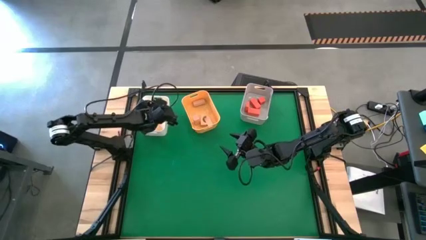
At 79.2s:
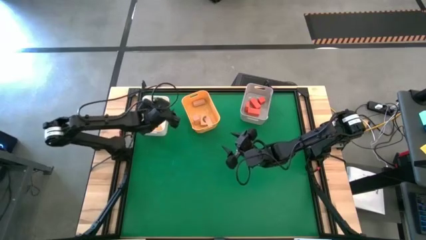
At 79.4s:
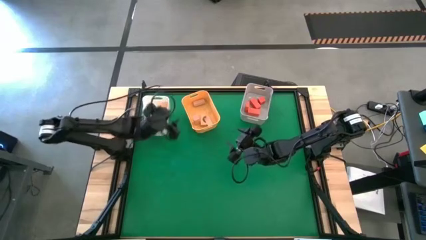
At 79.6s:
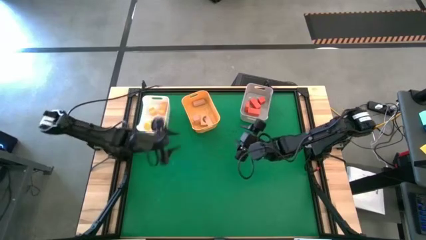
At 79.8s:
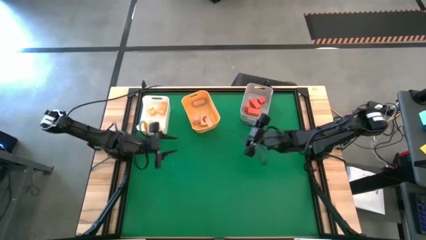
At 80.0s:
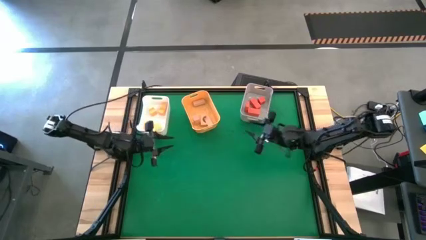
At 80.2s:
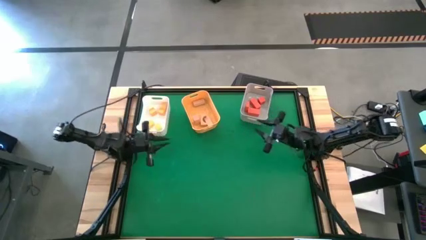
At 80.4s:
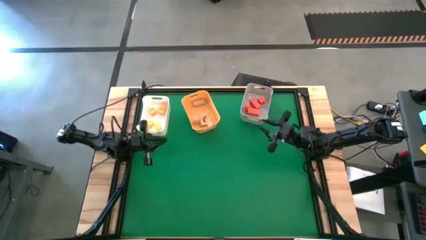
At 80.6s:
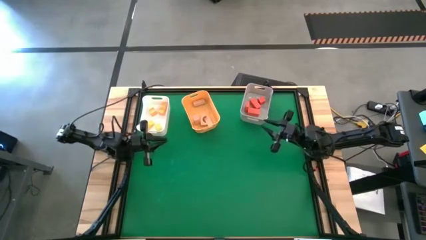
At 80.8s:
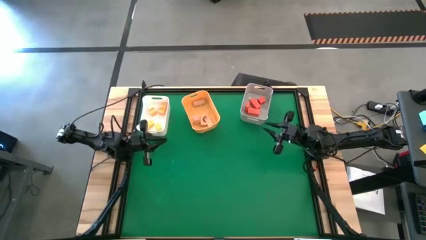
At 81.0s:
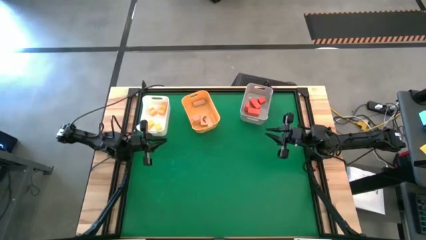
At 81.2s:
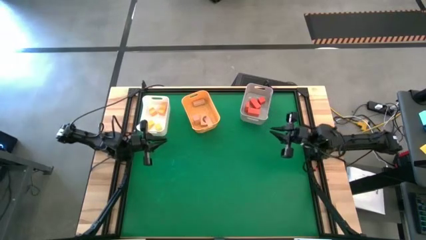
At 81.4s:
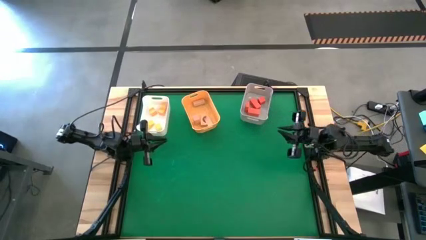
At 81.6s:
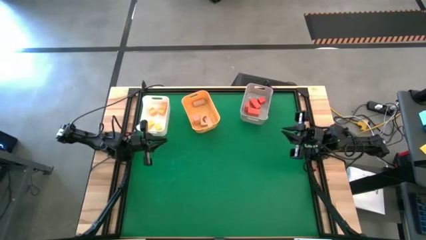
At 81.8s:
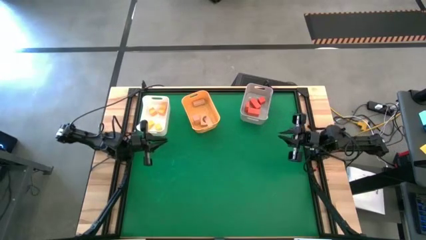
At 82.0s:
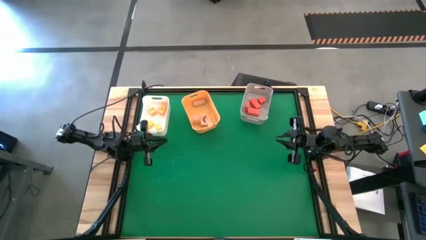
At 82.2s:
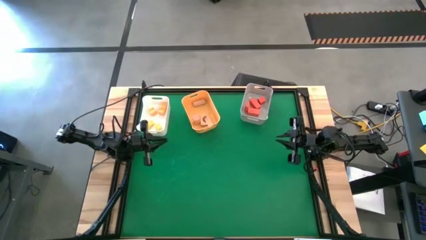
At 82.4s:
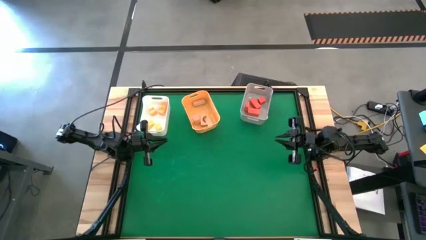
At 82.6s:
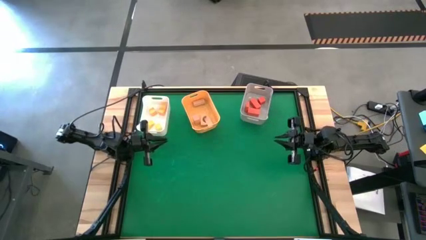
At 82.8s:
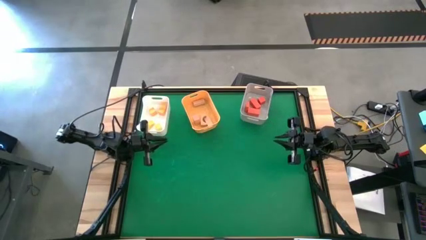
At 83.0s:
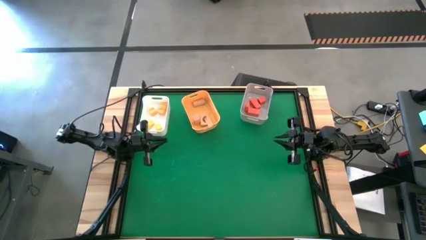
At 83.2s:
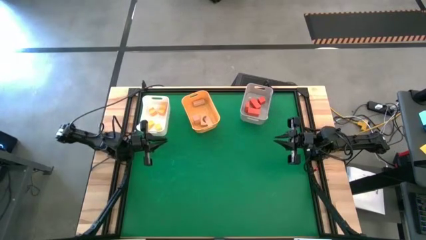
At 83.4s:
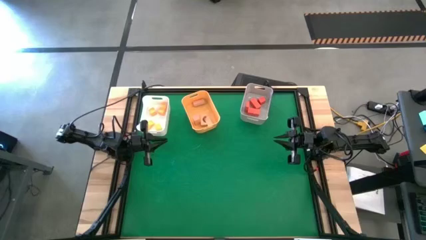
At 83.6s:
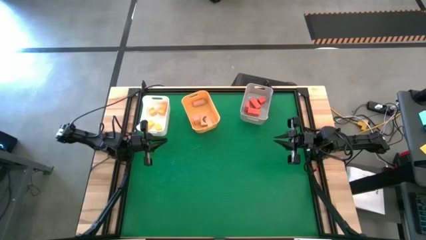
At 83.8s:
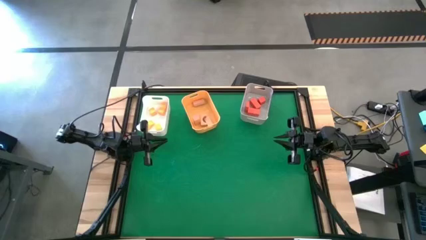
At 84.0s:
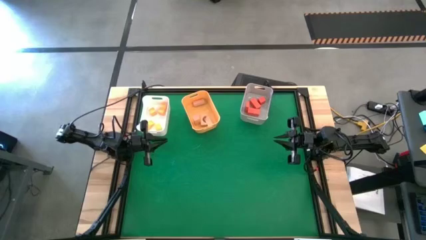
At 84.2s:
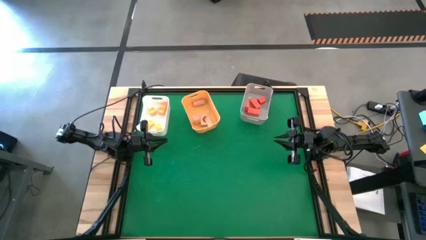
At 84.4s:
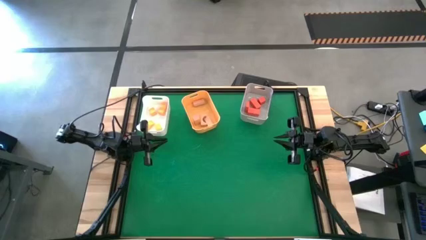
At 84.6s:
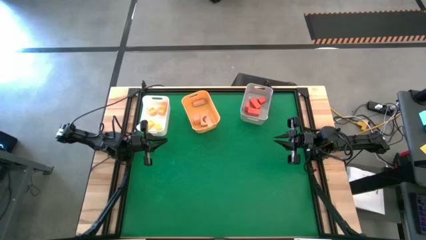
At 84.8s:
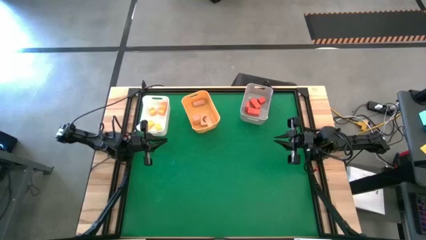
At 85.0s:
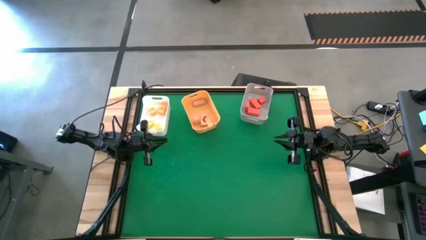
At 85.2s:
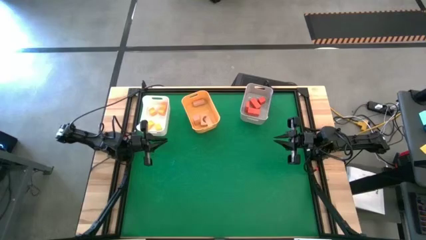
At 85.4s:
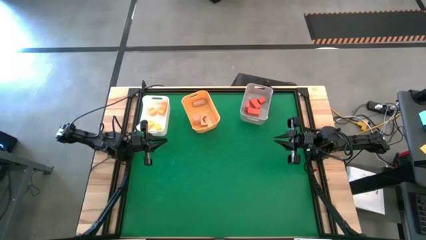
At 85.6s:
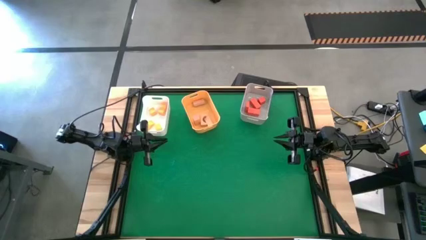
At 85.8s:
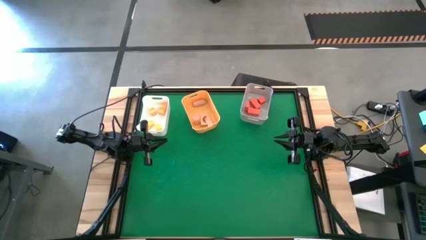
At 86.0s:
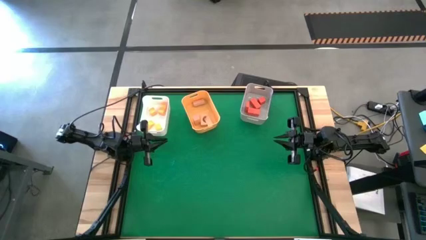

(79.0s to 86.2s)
Task: Sort & place blocks by color
Return to Home Position

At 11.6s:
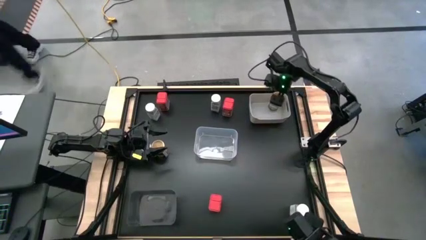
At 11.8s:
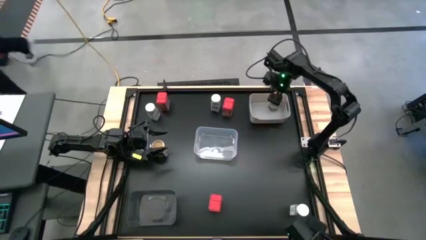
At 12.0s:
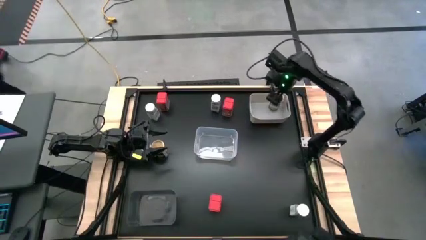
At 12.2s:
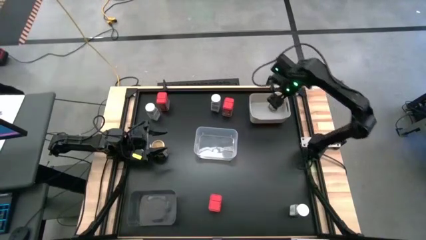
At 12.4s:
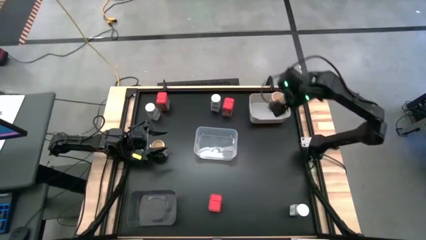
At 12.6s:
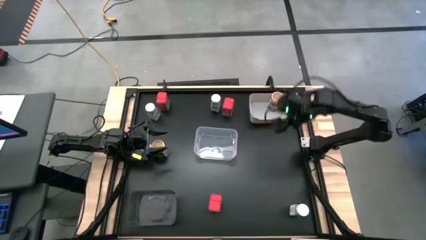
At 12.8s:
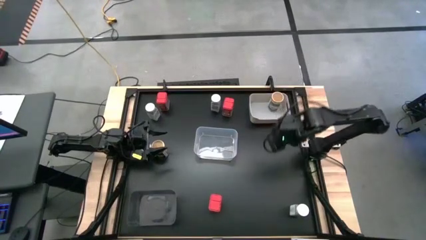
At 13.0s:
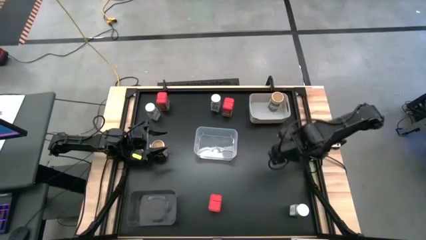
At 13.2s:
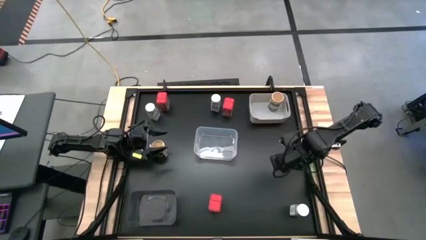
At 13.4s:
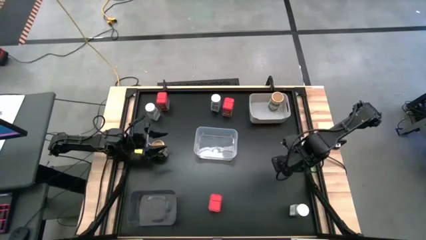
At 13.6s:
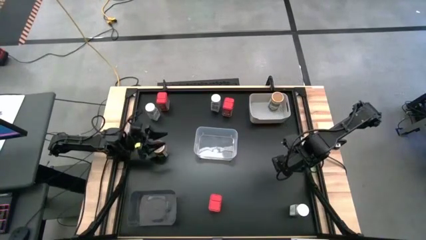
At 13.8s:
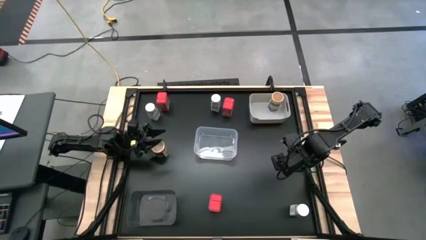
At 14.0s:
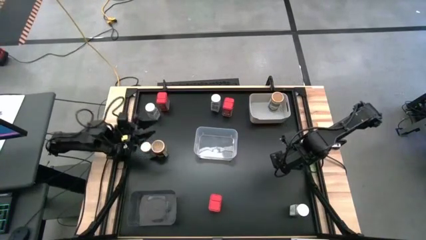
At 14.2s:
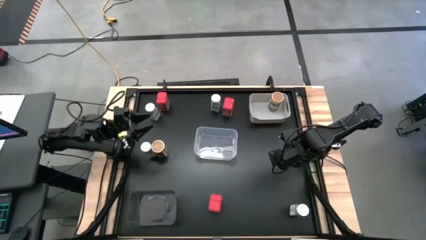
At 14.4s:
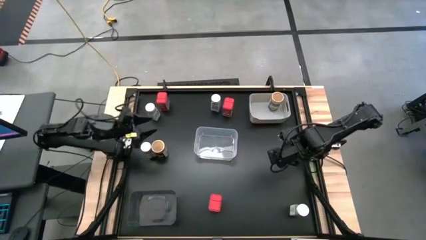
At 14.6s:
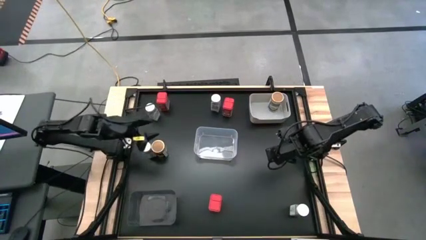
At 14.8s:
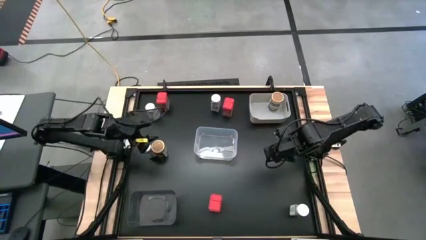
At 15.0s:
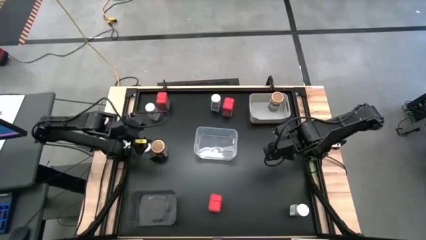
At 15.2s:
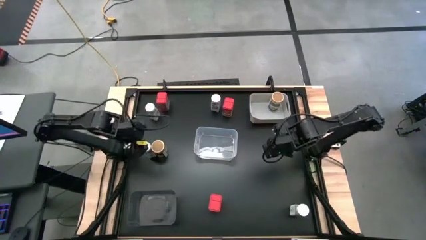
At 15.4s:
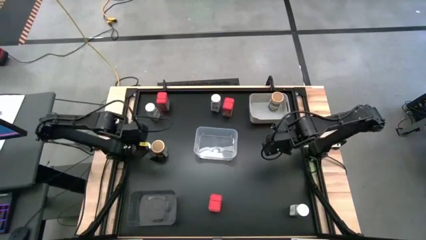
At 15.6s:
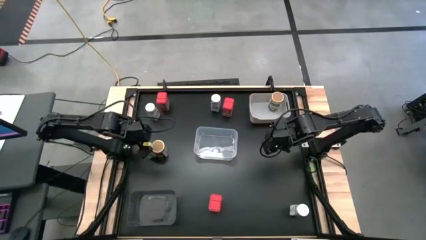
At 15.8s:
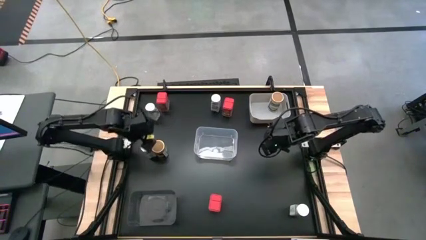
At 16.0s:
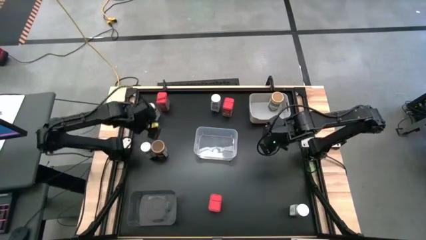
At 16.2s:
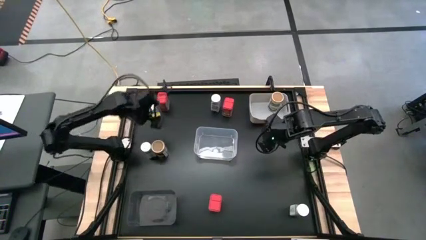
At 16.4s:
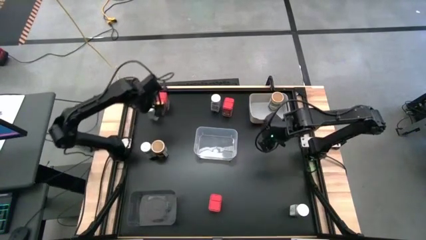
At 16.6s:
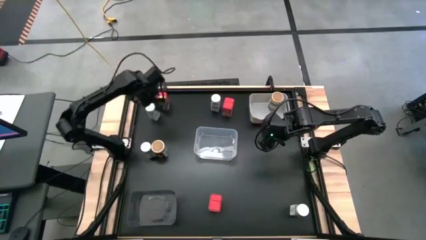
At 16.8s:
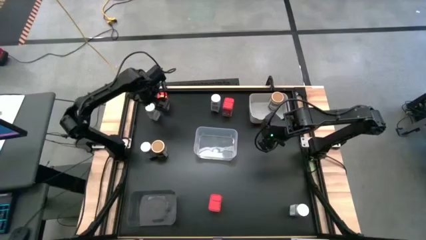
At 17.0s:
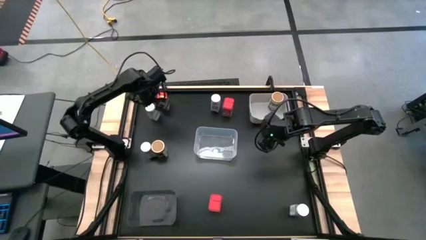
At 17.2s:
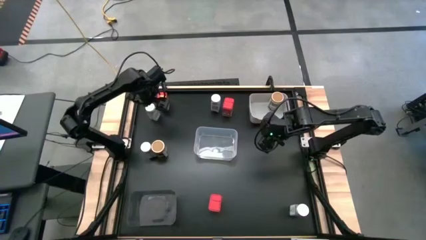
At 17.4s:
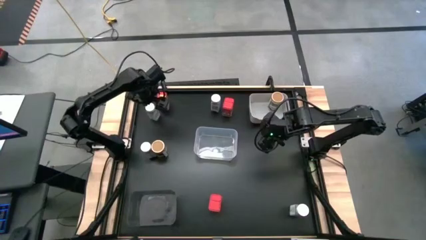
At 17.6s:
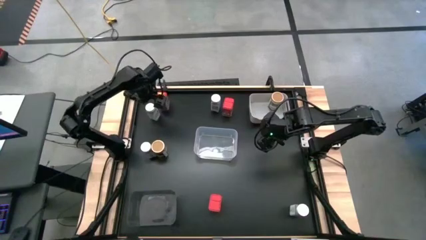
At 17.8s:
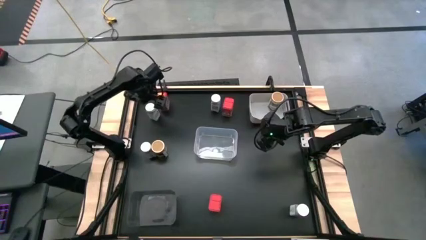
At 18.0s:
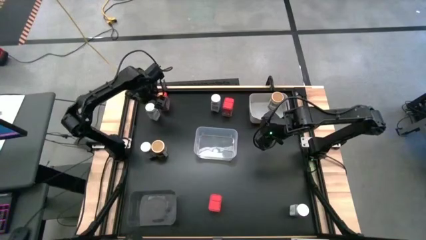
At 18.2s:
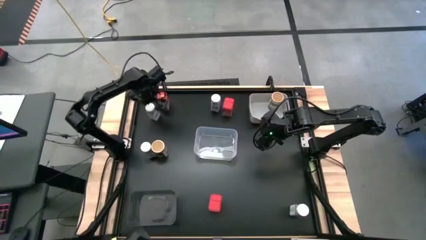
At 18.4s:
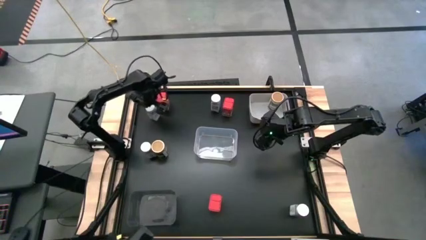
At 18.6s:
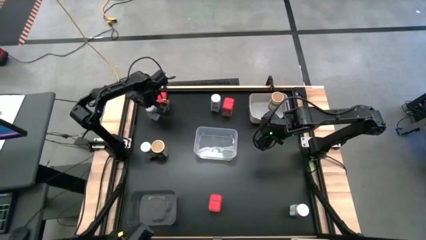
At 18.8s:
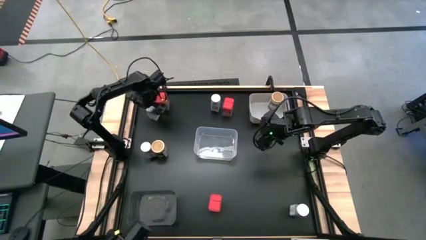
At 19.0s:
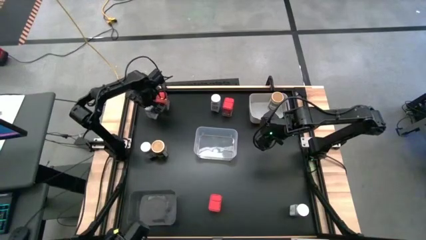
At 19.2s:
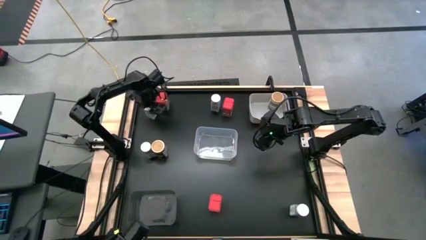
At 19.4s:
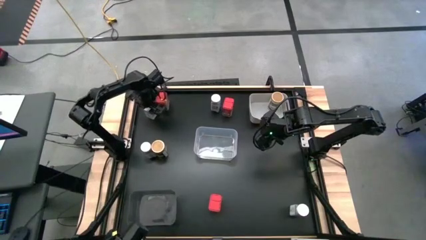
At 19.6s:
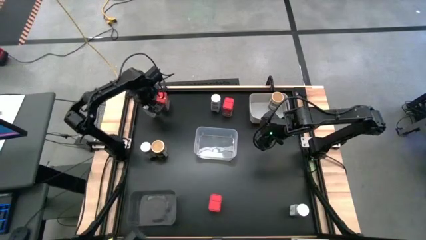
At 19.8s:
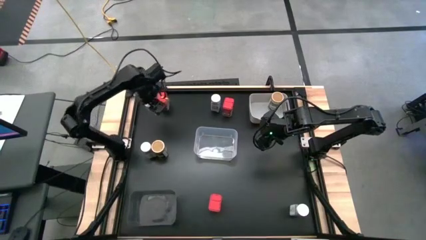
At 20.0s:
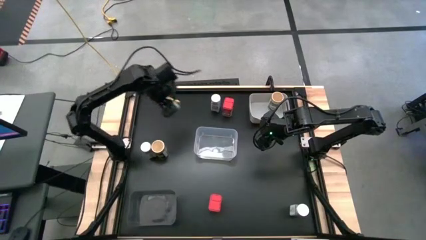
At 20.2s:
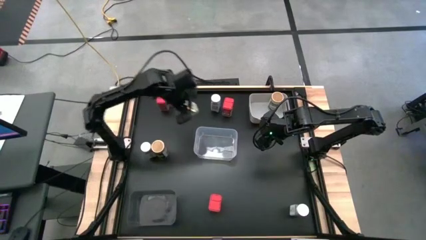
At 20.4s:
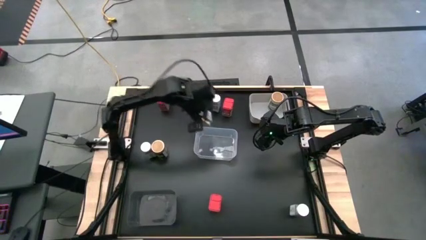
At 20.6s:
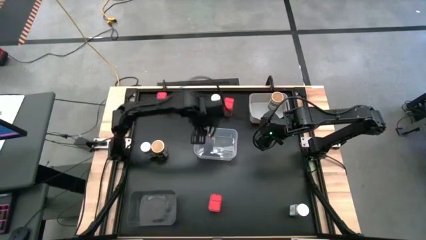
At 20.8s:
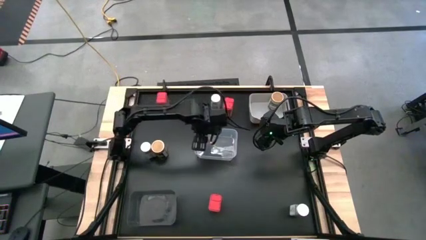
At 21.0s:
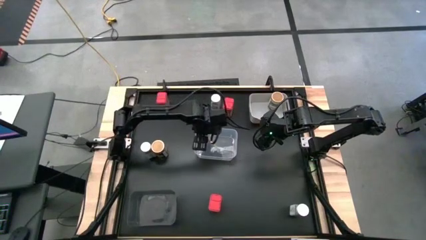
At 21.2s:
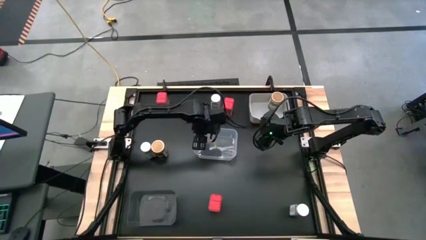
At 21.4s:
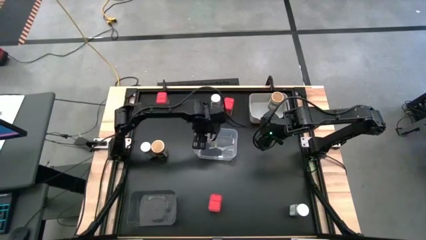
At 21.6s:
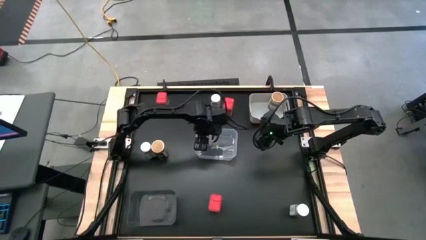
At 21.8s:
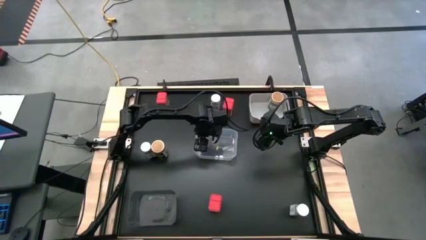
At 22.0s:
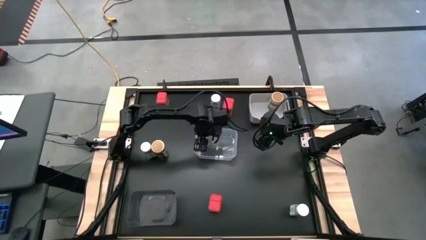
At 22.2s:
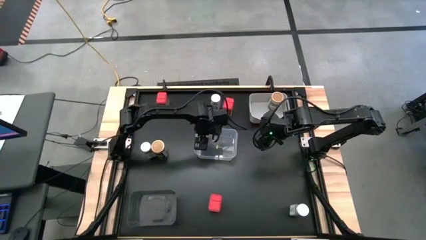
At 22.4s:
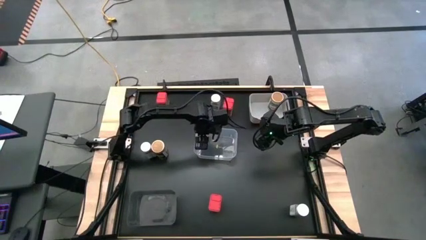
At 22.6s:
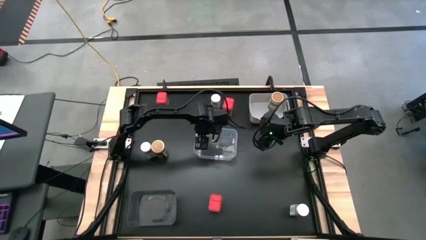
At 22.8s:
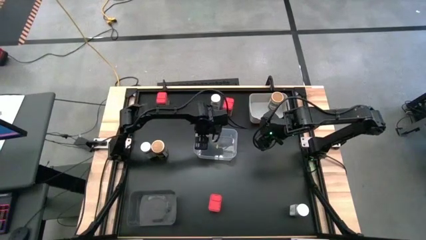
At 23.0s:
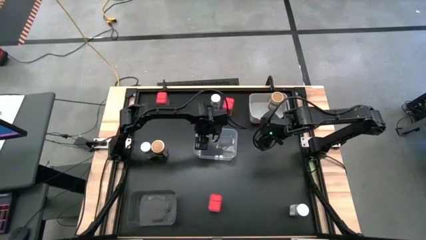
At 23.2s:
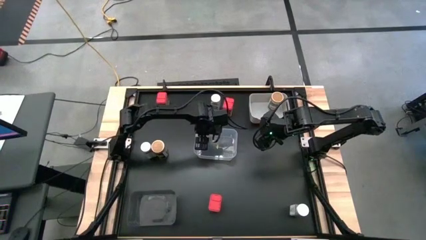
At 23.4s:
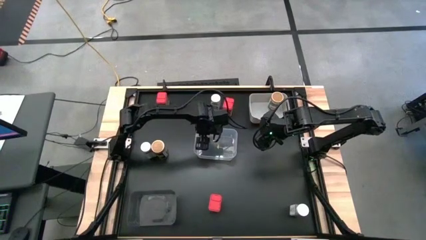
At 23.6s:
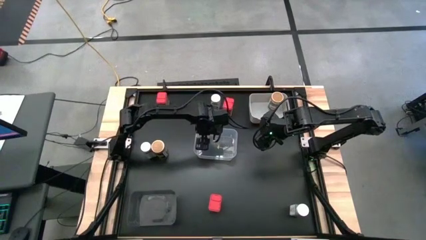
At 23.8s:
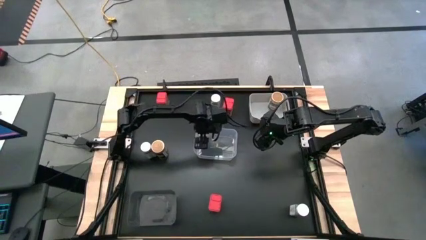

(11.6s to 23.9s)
Task: Sort spices by type
Put the white seasoning bottle into the transparent bin
